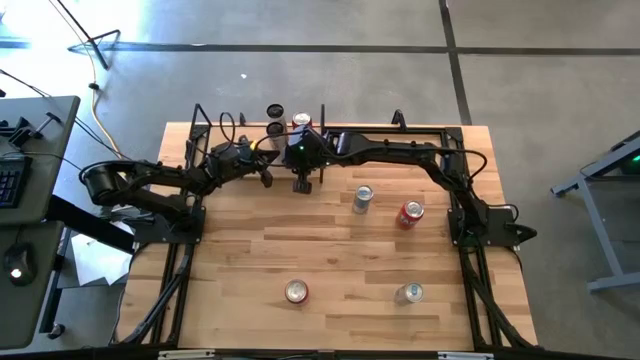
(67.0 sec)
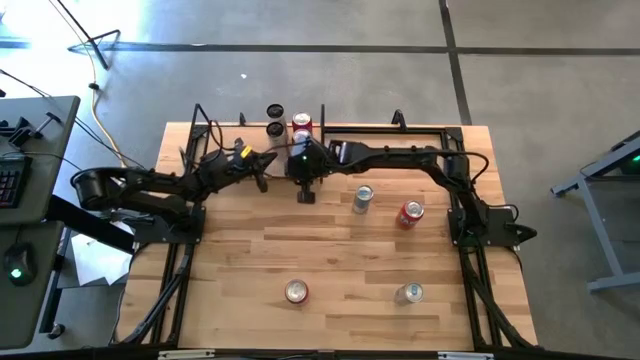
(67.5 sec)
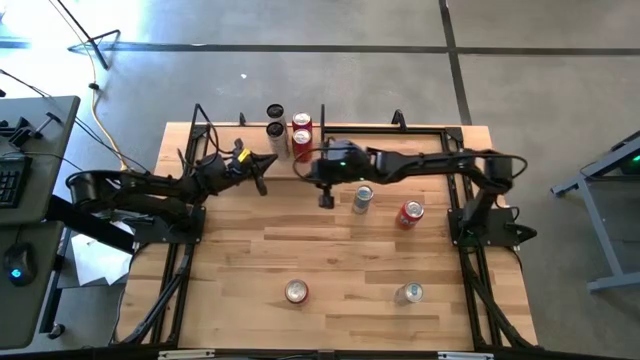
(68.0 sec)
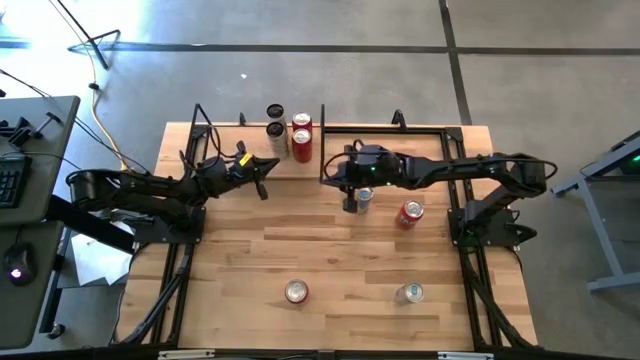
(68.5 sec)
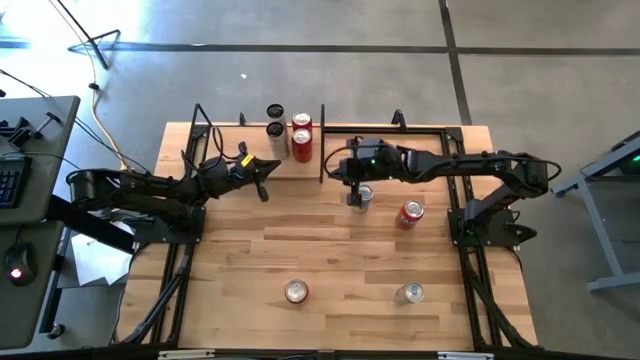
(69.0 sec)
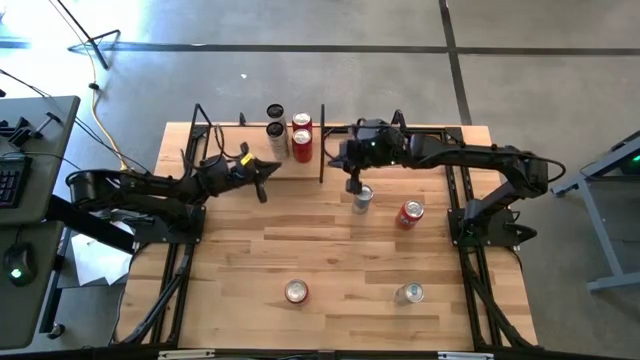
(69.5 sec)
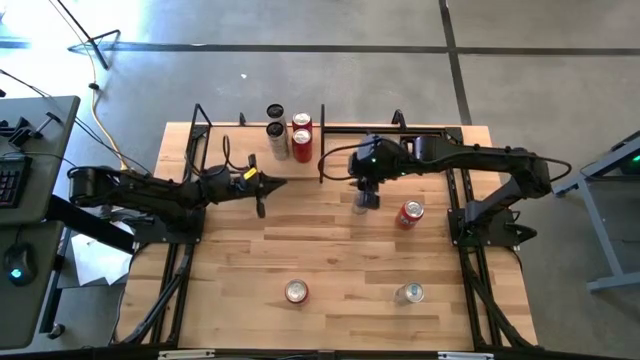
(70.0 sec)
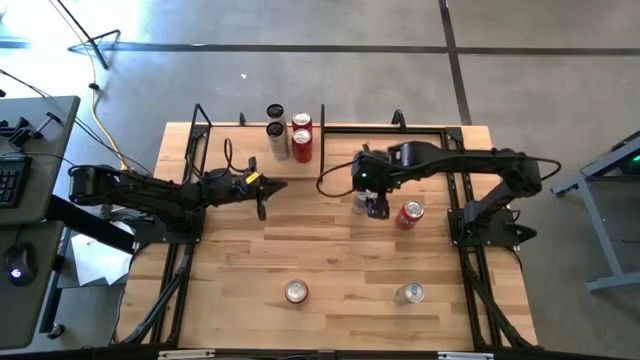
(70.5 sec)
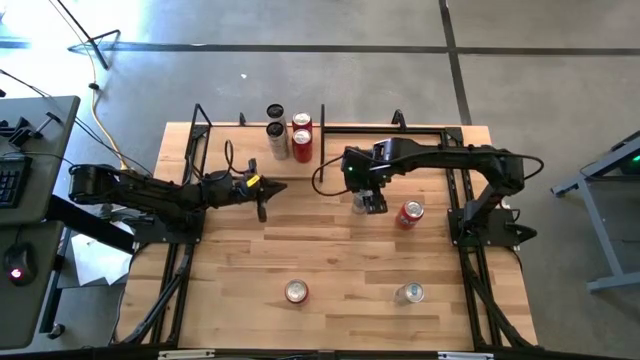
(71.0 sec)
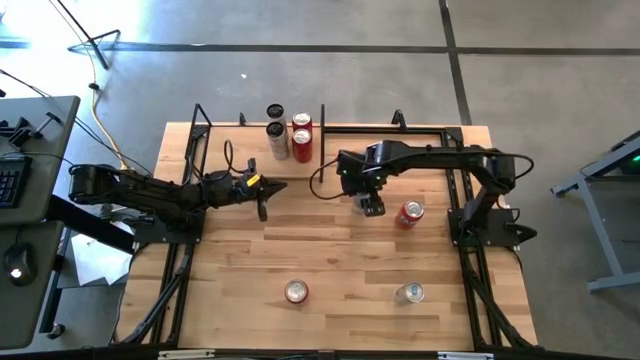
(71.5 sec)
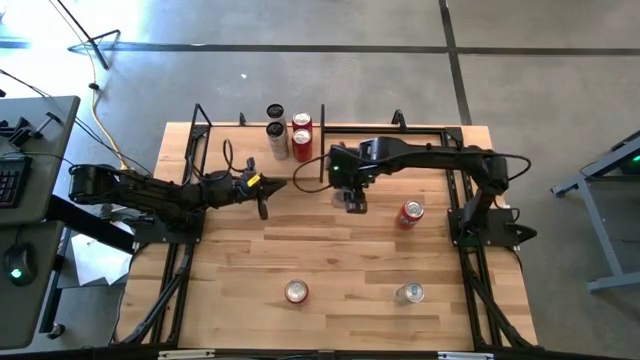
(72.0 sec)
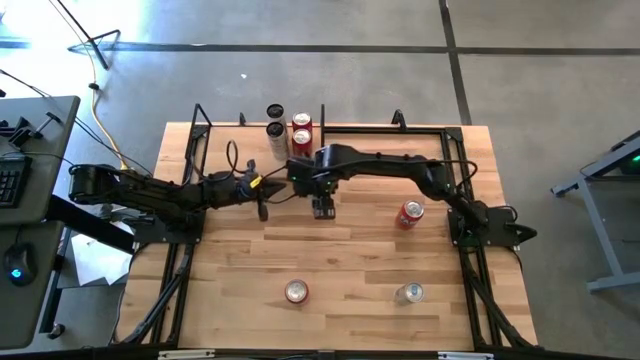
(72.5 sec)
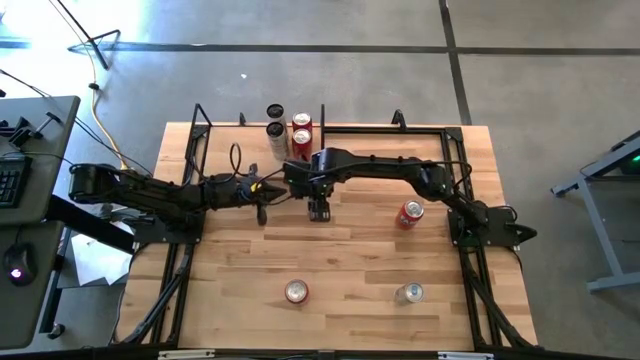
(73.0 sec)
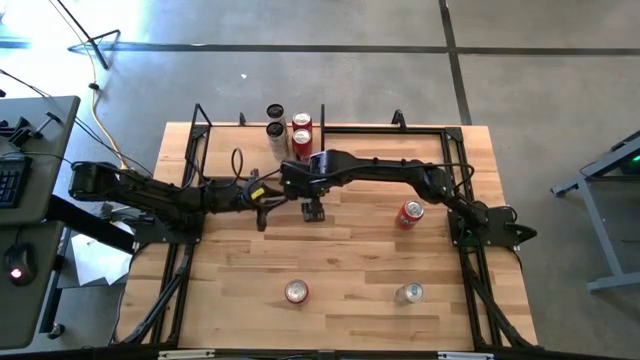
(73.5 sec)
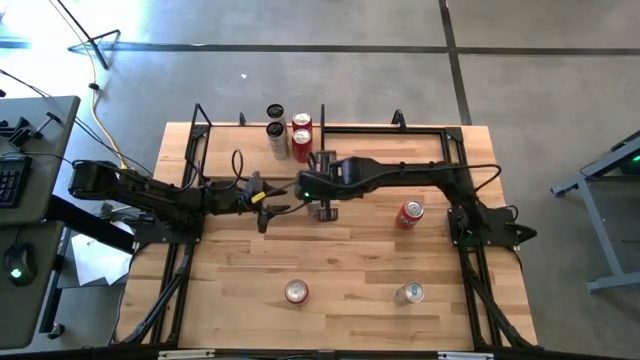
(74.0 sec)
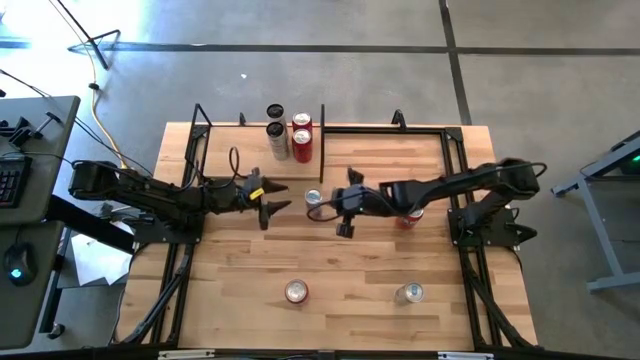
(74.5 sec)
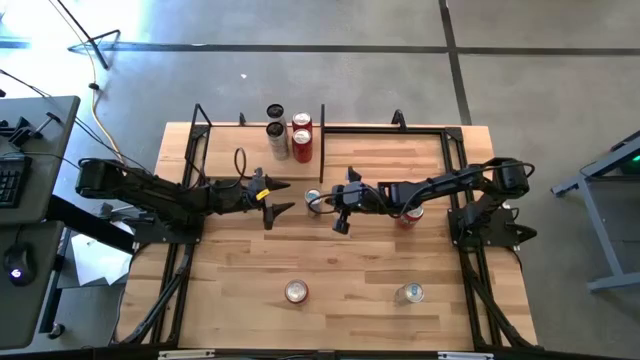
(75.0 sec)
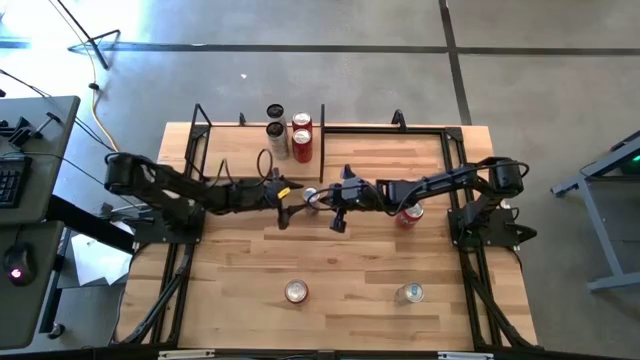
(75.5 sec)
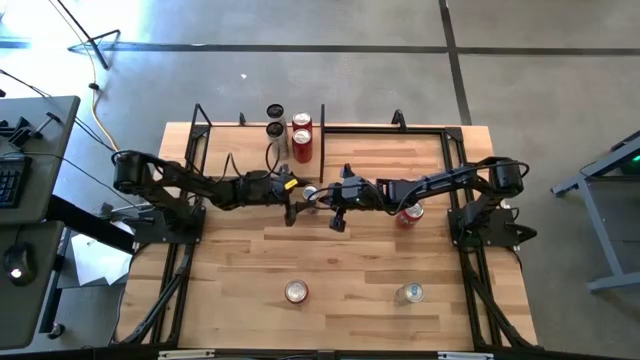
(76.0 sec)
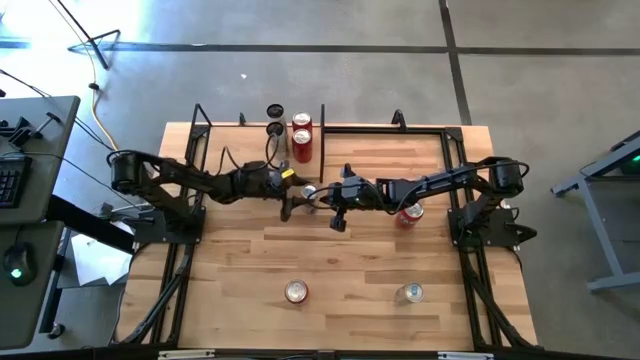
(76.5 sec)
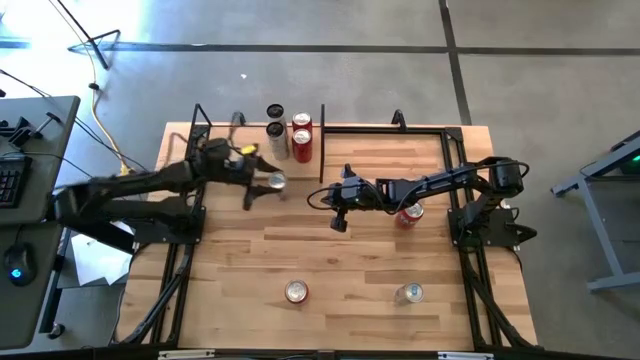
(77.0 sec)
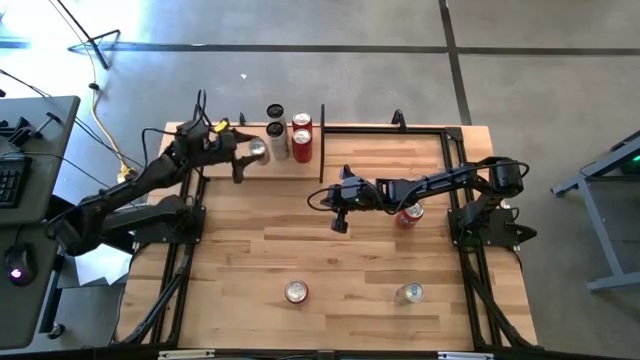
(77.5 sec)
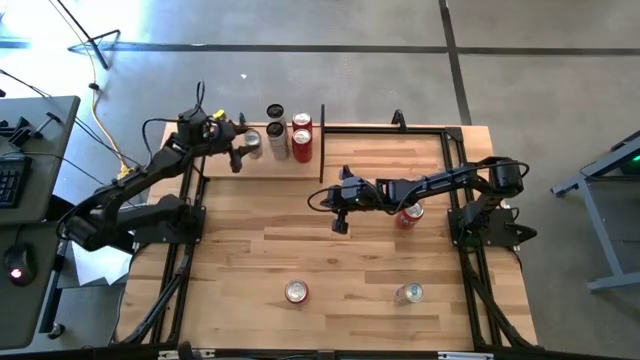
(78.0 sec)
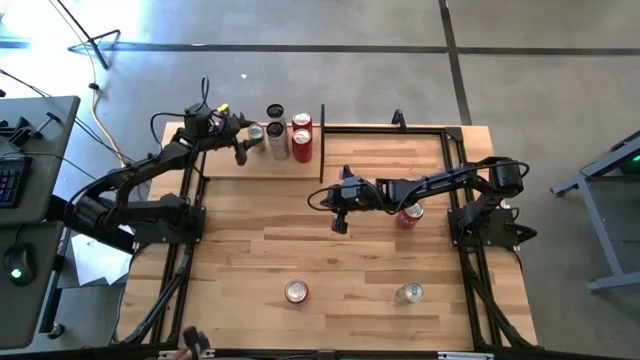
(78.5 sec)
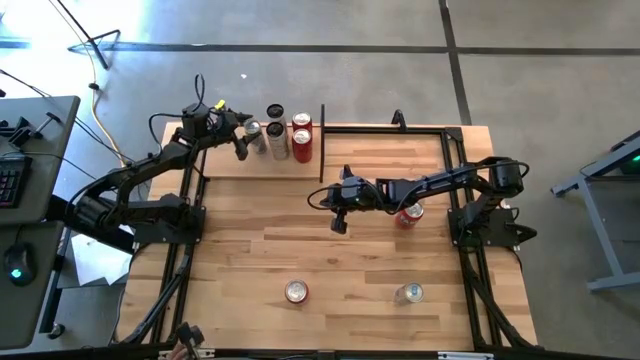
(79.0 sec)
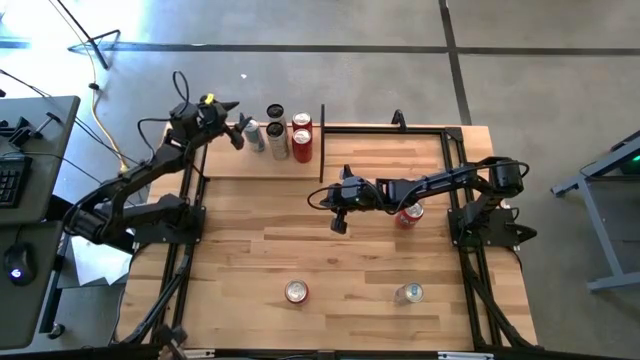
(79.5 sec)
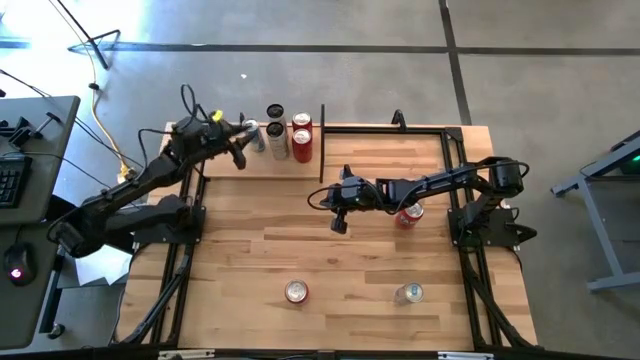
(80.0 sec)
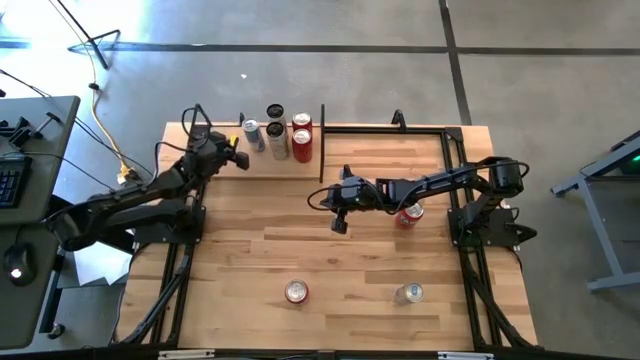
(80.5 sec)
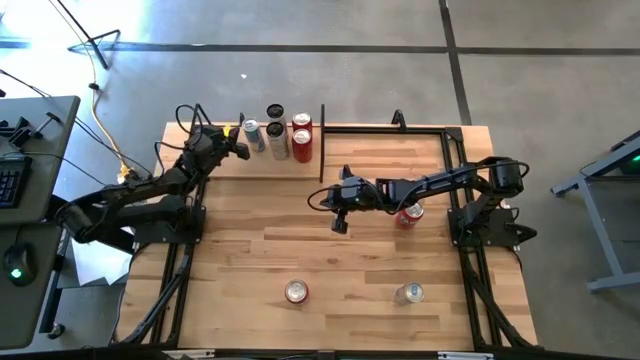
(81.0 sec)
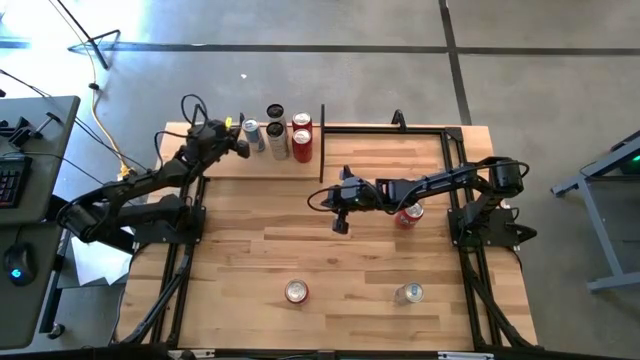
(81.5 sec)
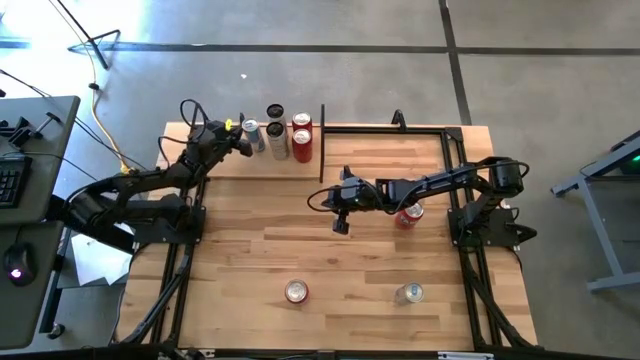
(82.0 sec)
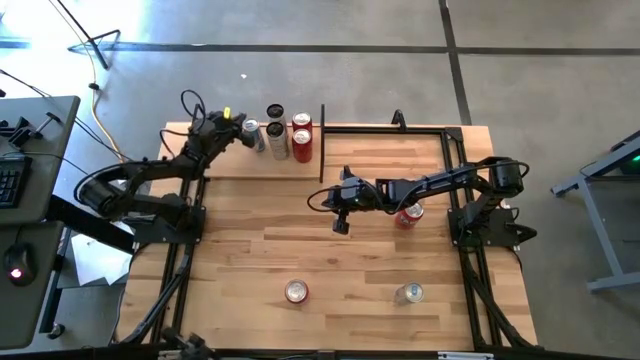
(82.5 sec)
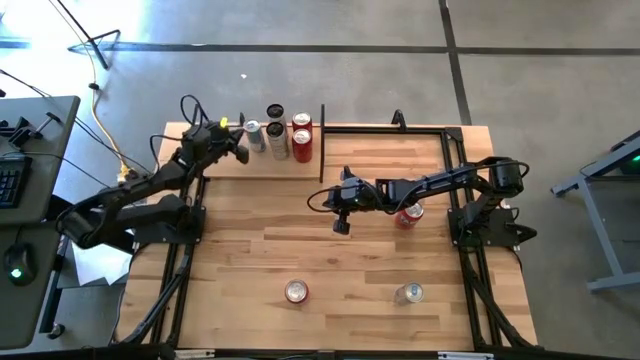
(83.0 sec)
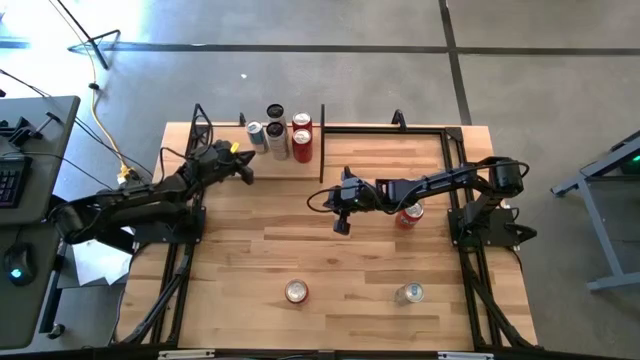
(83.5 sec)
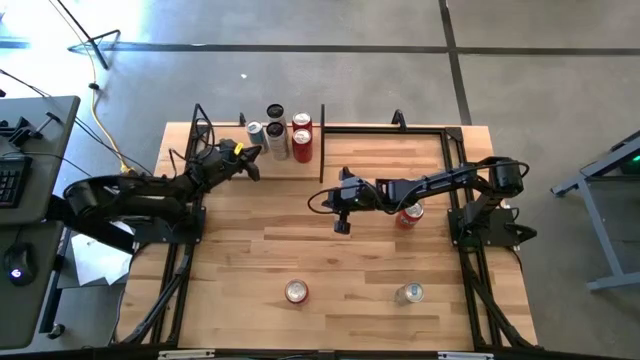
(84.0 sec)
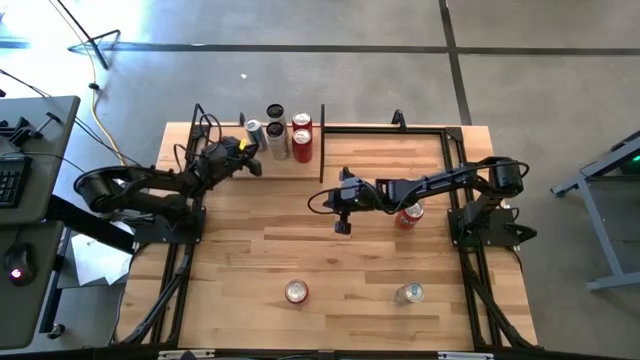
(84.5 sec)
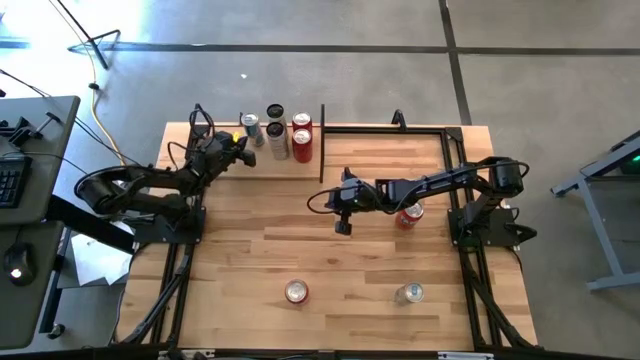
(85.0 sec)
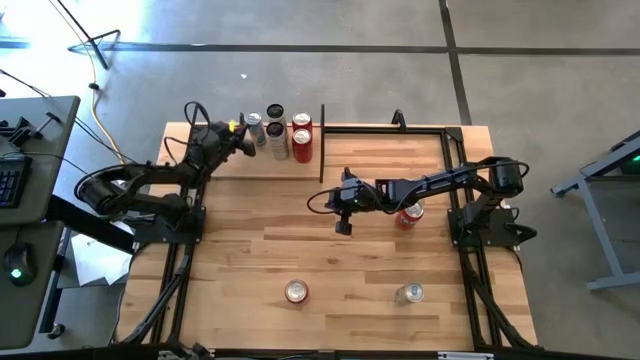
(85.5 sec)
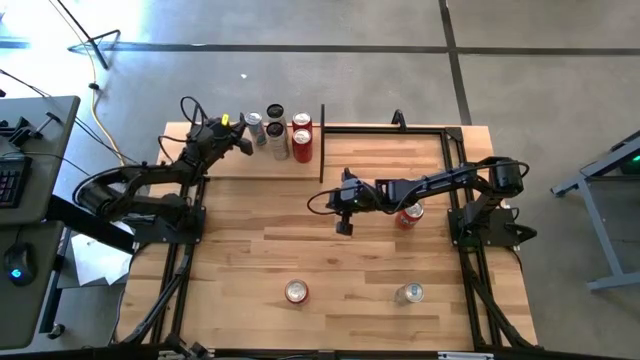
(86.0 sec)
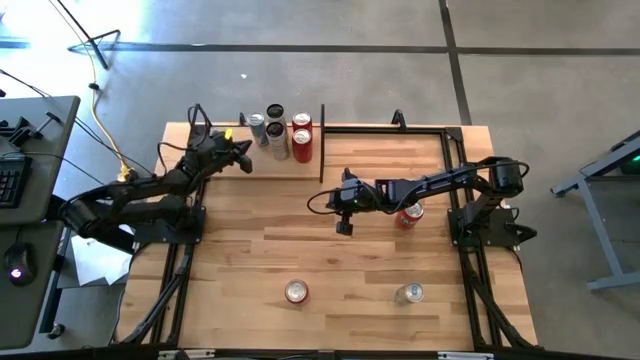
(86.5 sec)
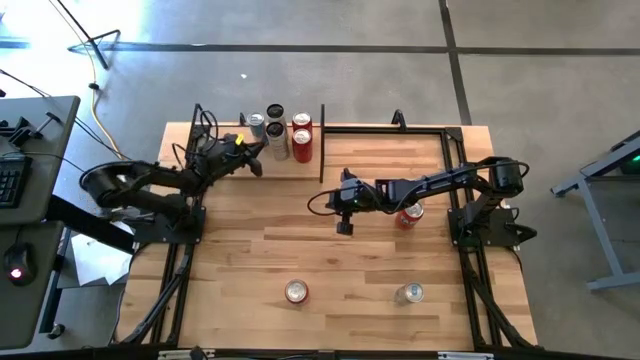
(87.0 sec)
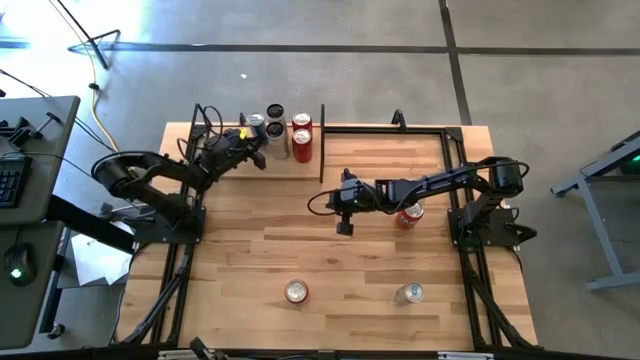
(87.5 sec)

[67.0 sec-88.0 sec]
Task: Place canned beverage on shelf
Put the top blue soda can on the shelf
